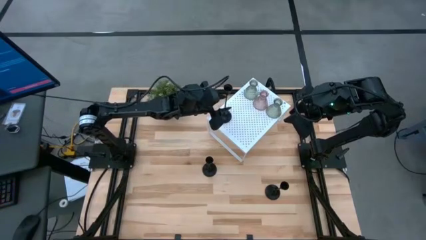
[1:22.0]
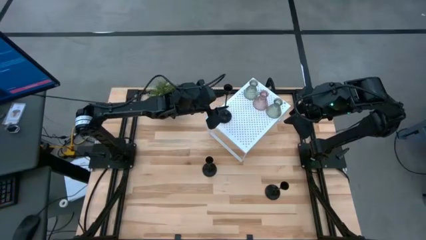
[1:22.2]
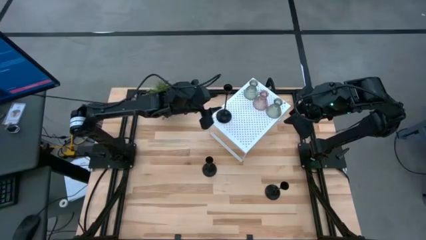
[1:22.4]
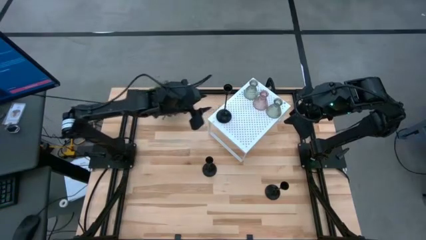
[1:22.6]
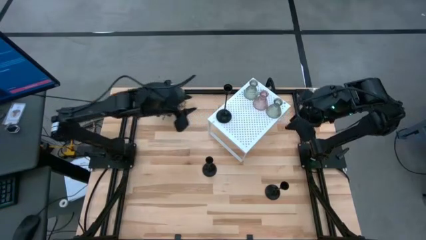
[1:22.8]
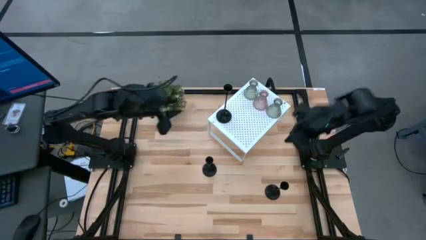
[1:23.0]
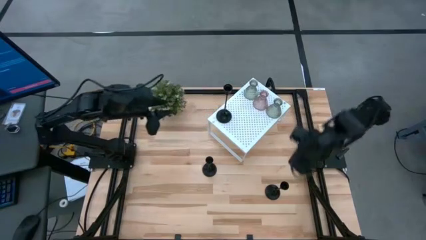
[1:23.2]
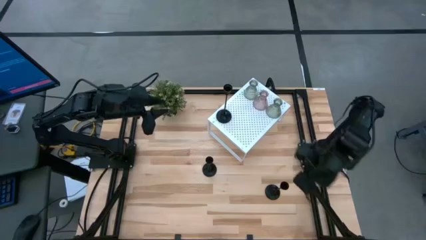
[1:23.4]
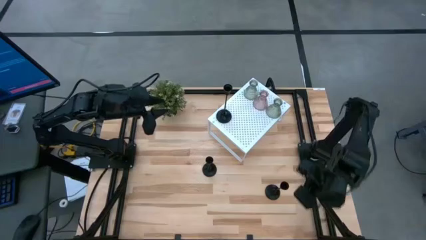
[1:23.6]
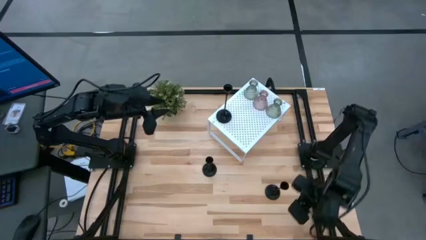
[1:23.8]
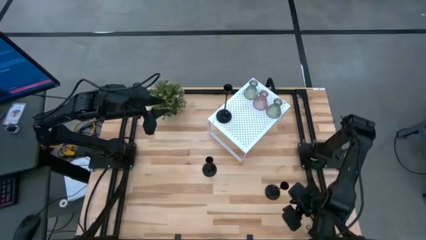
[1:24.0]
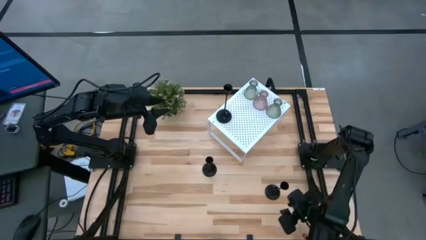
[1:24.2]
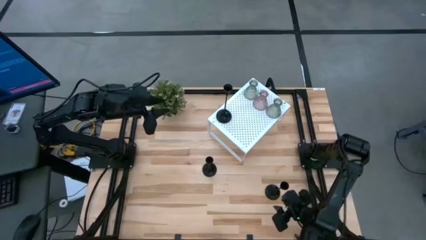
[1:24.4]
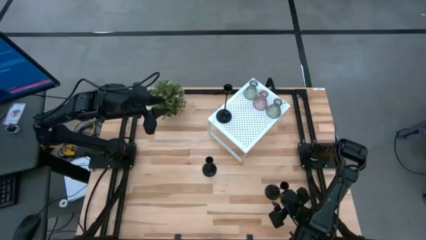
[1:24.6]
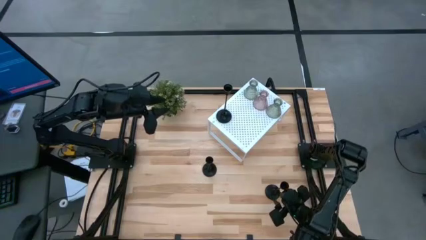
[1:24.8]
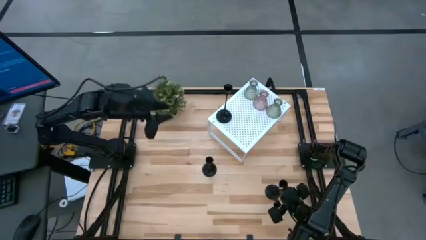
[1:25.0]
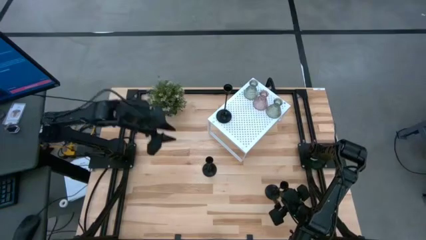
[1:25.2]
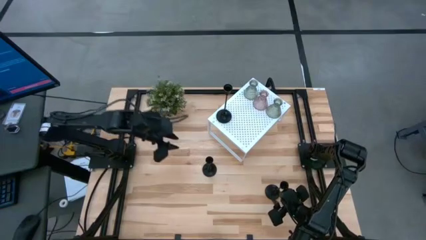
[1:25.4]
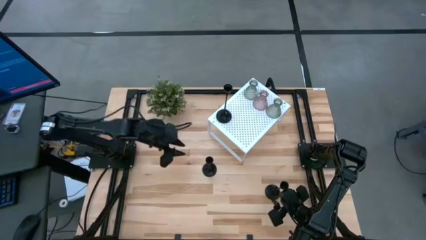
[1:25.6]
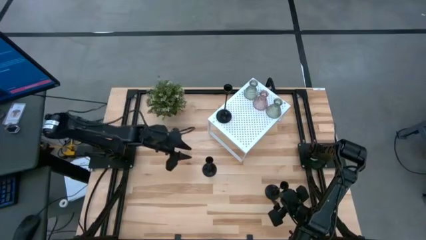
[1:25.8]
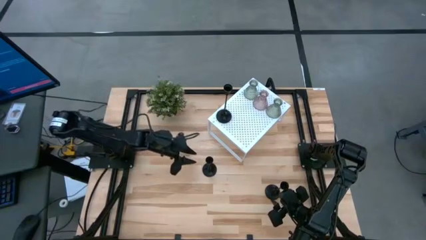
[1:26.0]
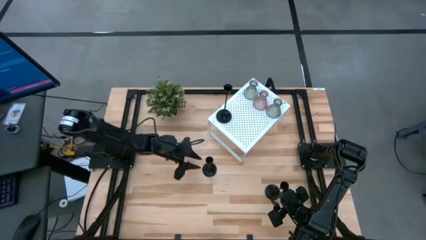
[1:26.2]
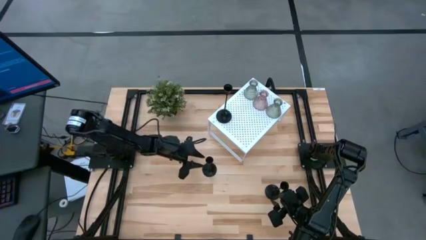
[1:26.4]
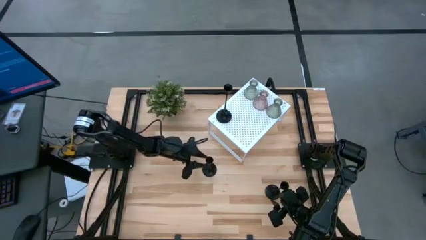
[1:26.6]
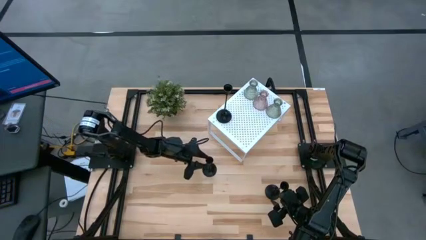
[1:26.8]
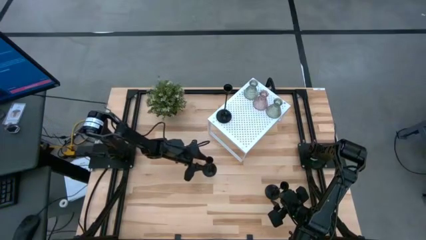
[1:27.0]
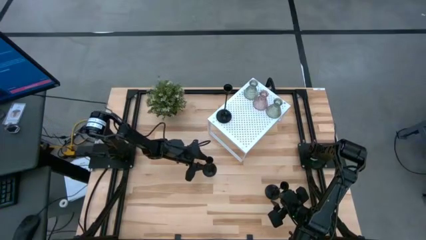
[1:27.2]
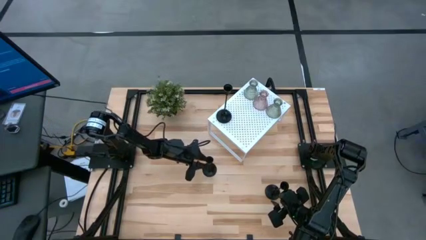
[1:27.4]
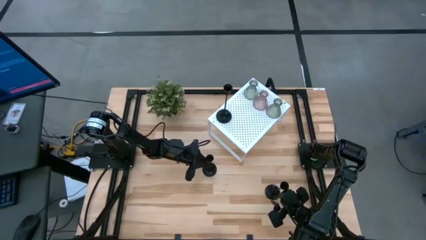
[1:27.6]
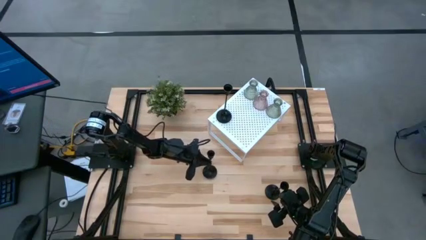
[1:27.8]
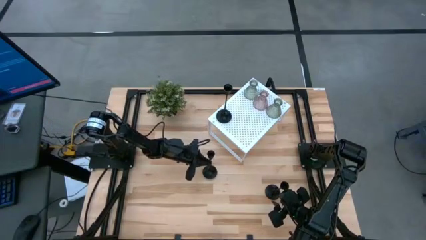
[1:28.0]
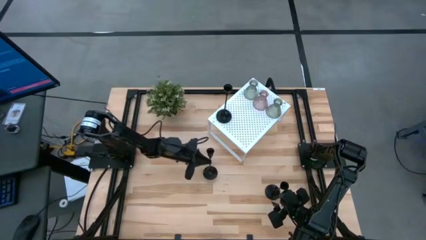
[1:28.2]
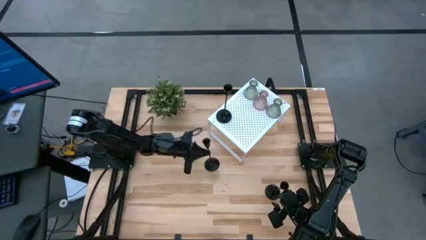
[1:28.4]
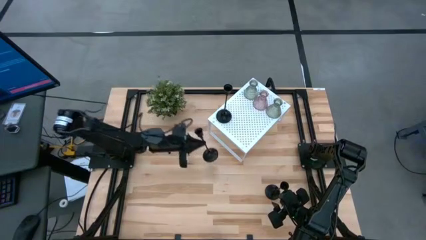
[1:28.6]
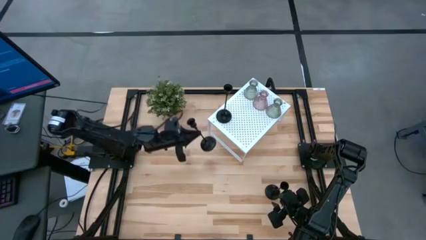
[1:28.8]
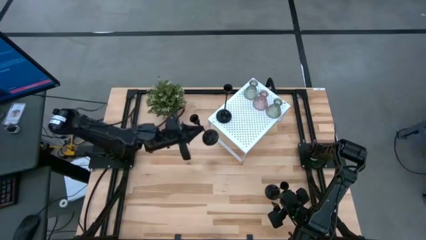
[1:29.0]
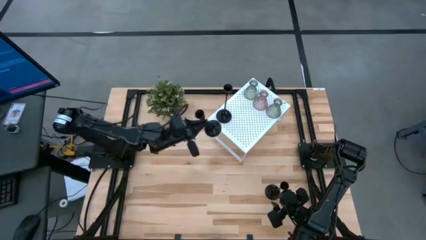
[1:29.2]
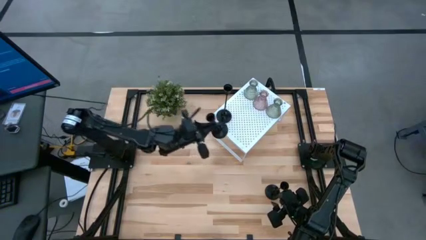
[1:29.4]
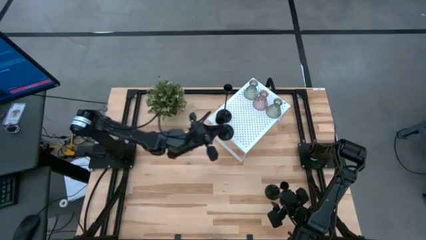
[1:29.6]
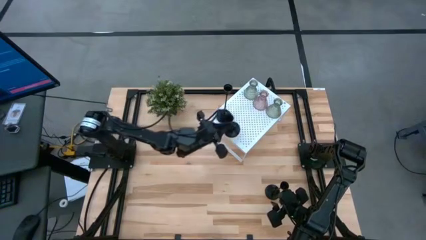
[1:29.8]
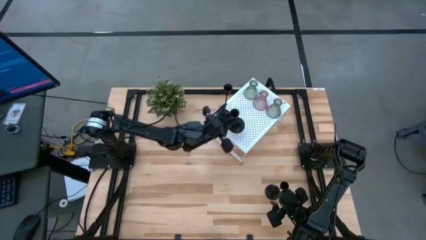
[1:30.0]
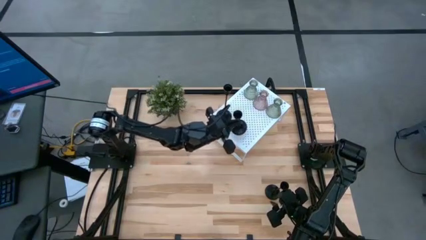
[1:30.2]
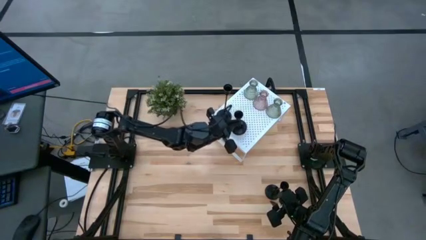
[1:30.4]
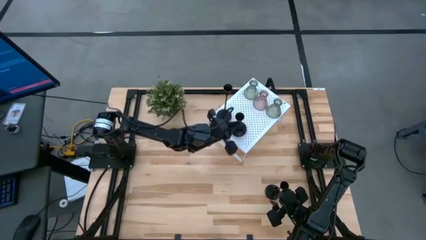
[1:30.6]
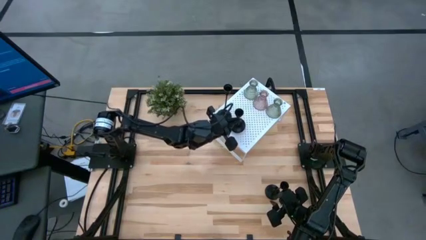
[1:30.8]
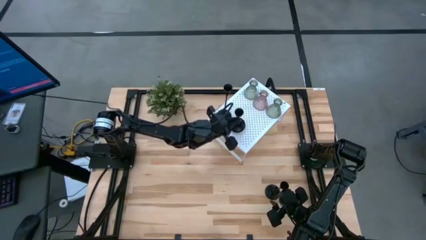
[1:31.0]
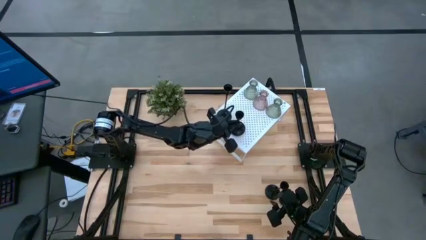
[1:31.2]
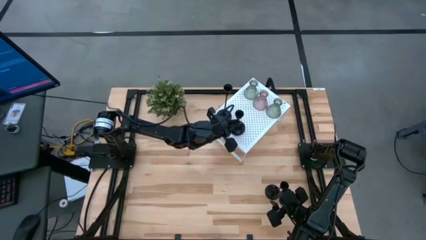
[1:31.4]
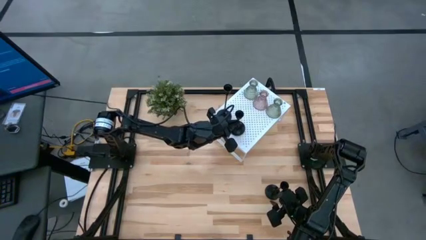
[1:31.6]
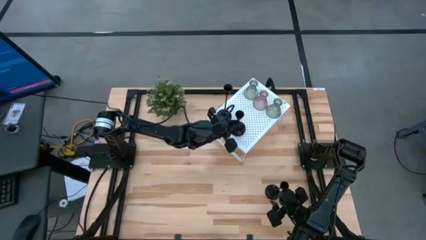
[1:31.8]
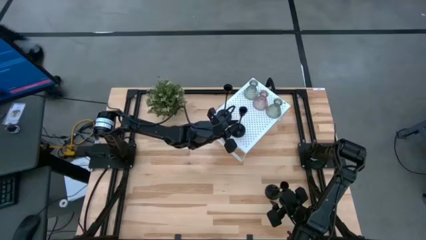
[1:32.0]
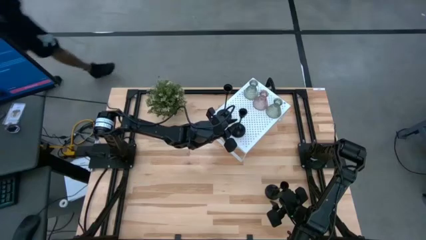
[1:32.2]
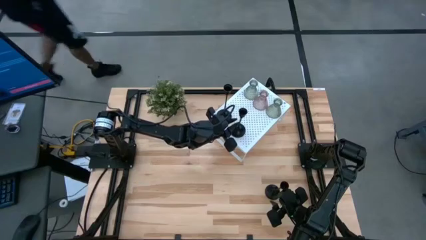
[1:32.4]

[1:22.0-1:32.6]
Task: Pick & Place candle stick holders
Put the left black candle holder on the shelf aligned with the other black candle holder

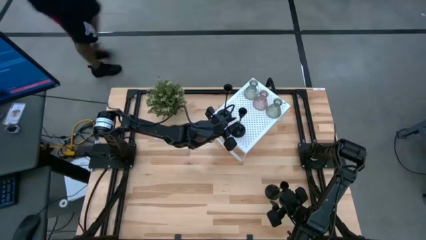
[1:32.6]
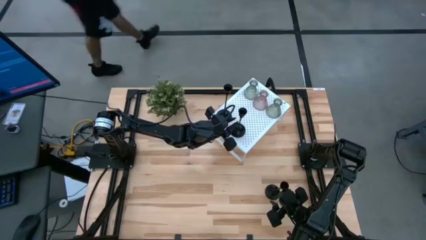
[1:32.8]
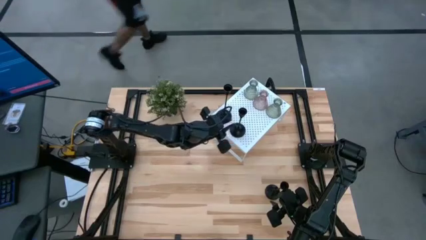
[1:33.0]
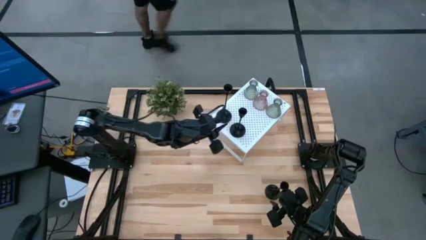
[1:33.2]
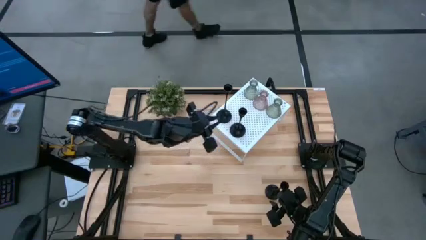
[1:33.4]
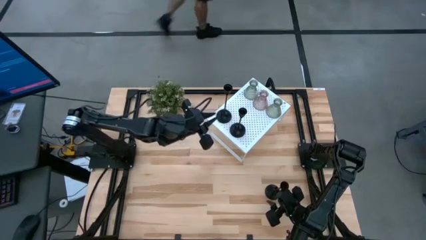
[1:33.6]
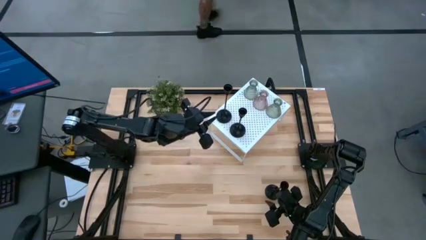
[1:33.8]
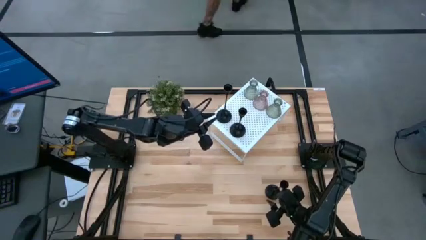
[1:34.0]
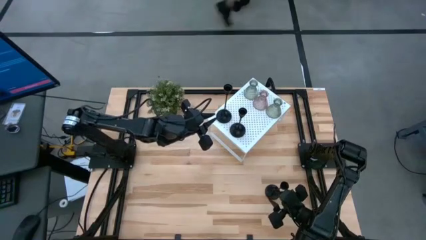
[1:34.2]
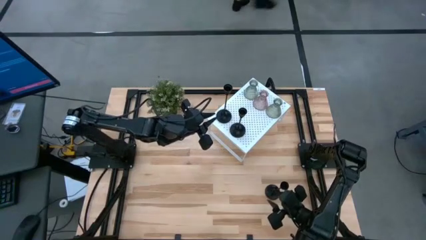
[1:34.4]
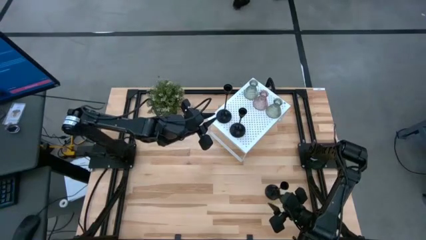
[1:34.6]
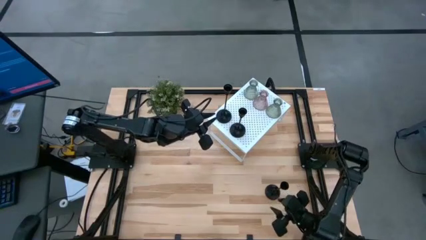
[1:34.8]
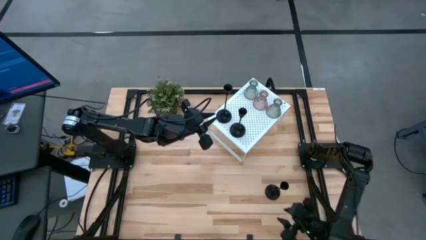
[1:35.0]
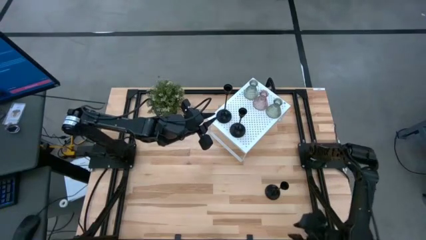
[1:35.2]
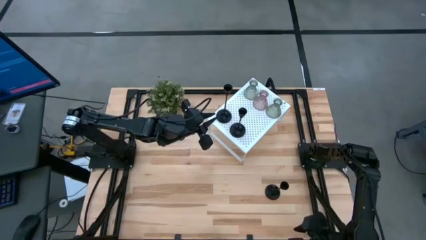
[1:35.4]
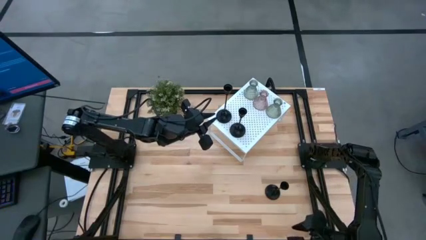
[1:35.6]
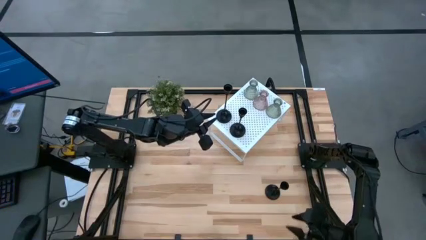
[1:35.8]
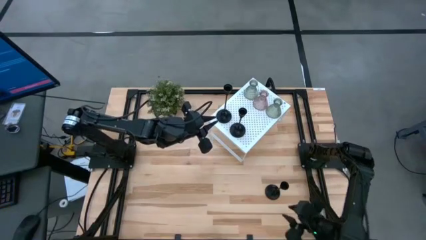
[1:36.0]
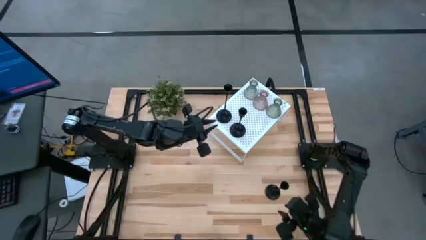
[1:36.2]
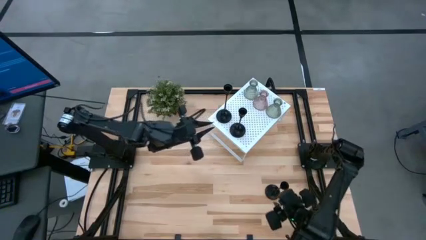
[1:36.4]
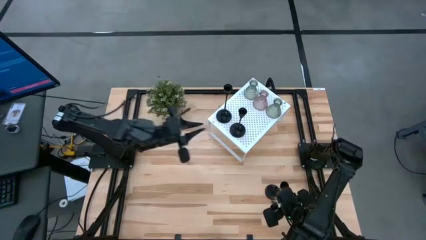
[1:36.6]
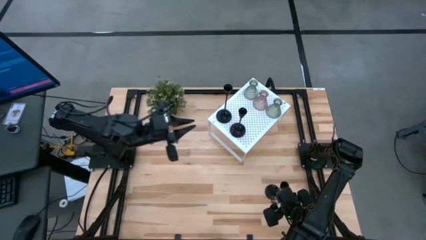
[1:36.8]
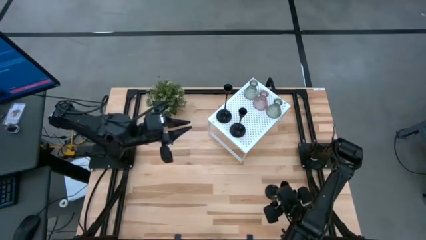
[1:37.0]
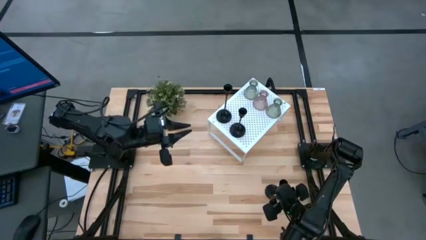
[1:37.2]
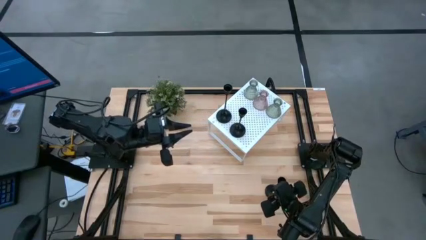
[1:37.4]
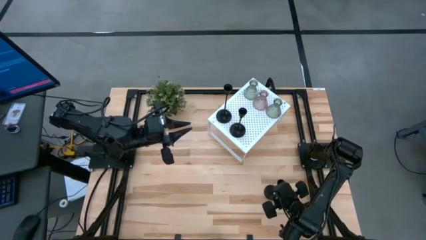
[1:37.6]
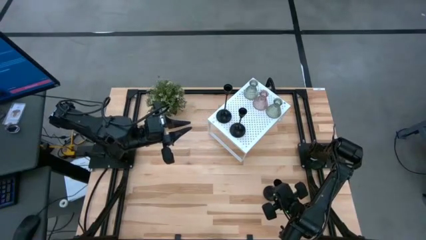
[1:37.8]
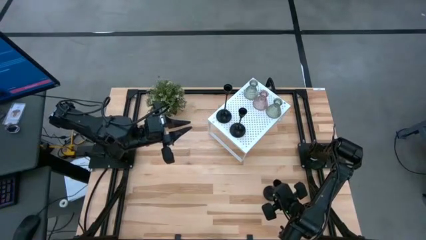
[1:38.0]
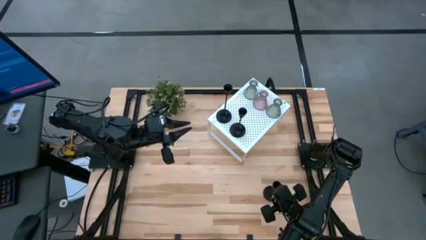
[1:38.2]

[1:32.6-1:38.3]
Put the black candle holder on the shelf aligned with the other black candle holders

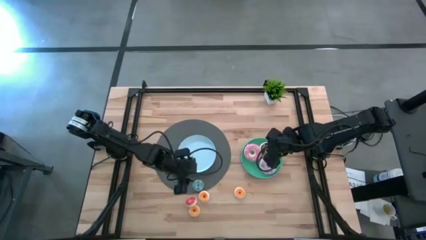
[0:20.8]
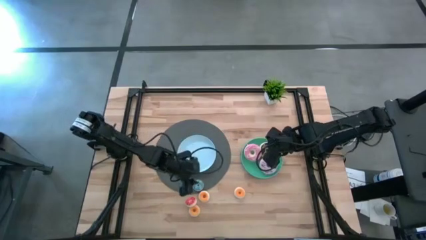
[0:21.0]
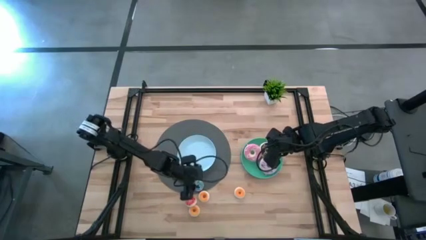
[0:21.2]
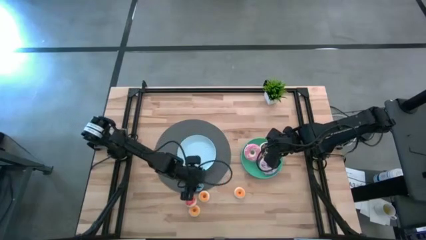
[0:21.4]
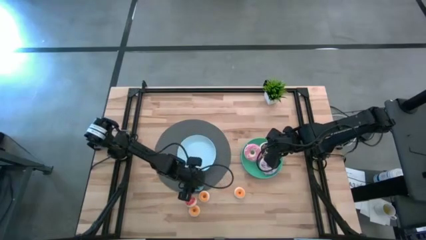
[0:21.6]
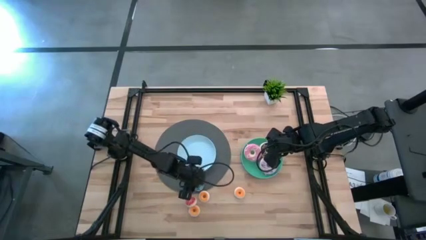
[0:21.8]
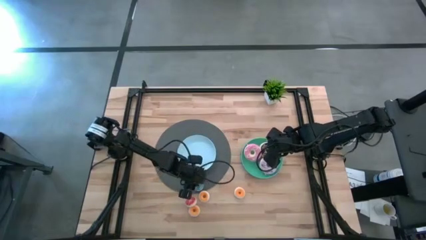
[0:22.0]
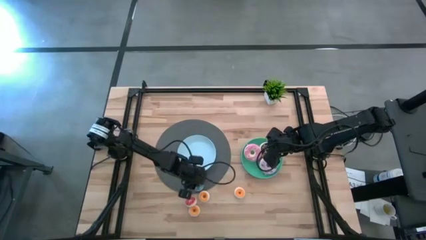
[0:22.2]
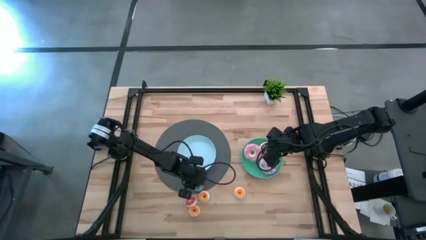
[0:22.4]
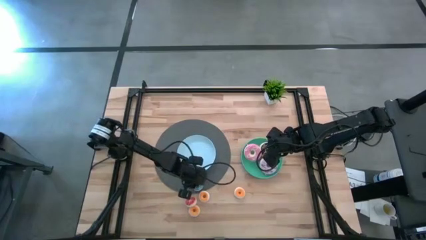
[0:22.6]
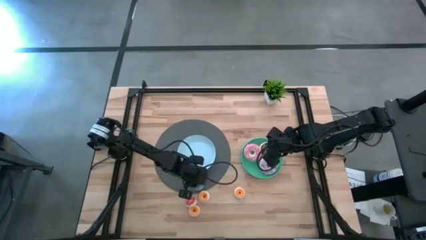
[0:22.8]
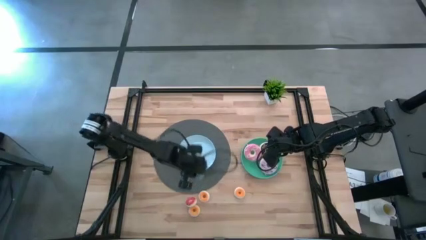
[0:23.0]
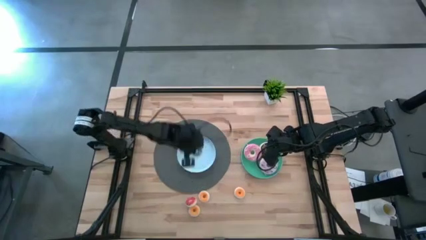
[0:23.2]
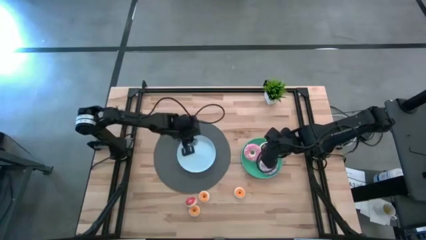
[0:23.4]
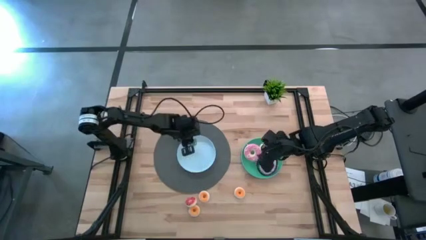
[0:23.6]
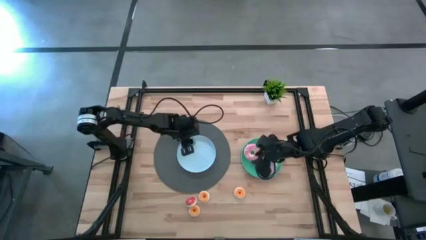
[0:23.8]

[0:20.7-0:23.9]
Task: Pick & Place donuts
Put the small blue donut on the blue plate
